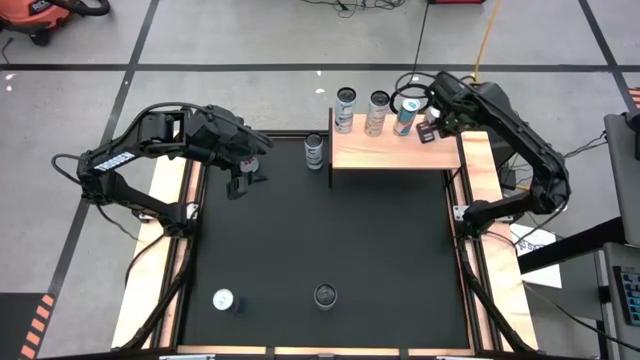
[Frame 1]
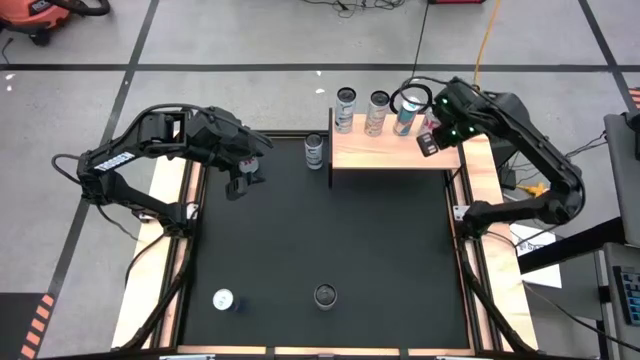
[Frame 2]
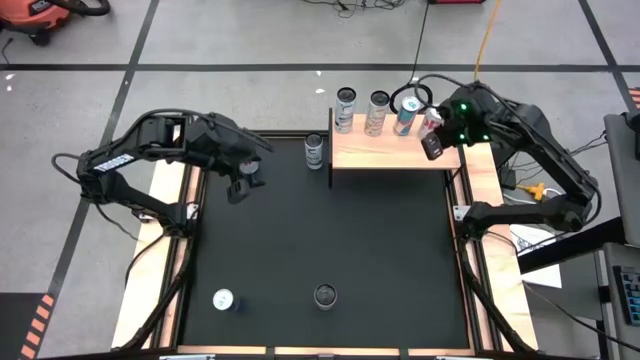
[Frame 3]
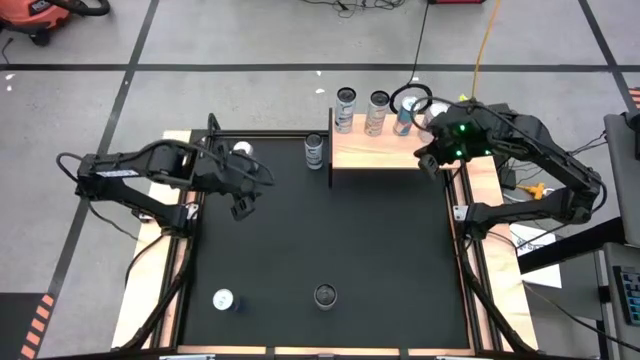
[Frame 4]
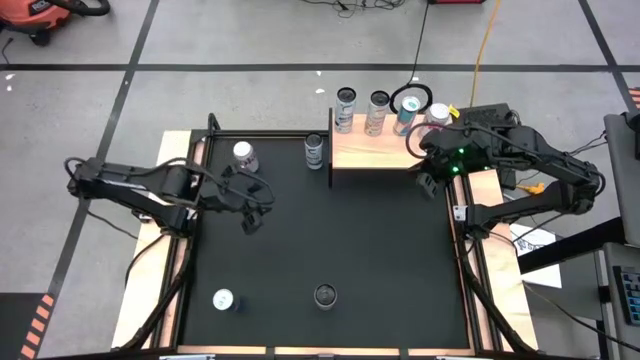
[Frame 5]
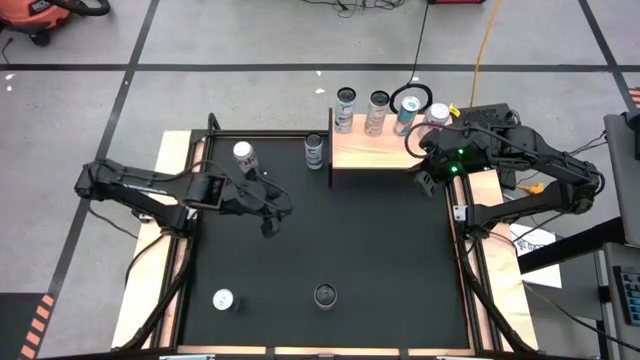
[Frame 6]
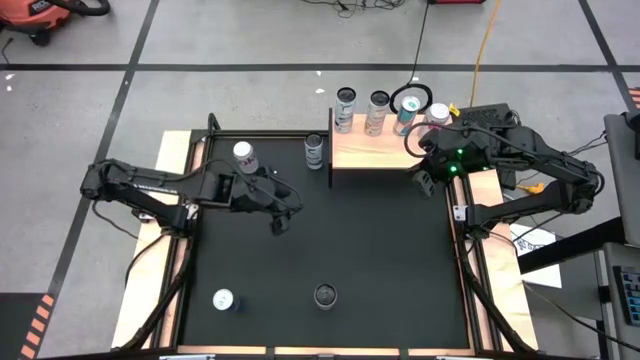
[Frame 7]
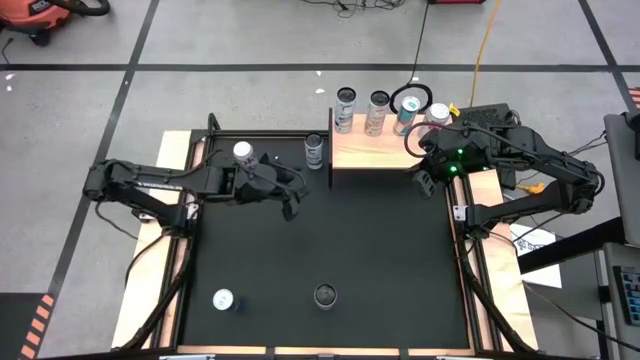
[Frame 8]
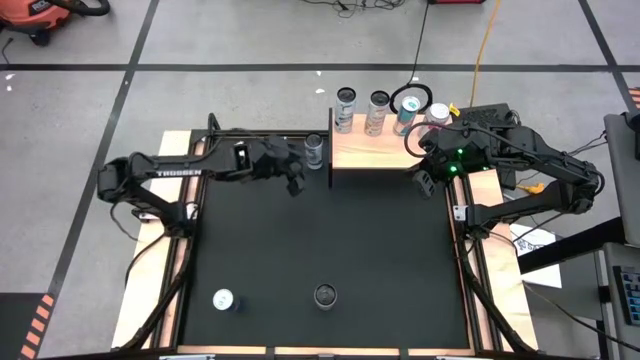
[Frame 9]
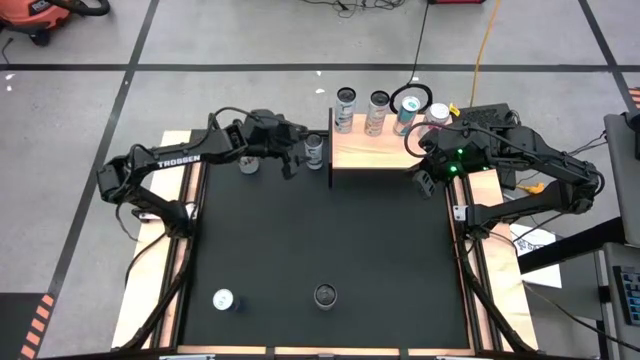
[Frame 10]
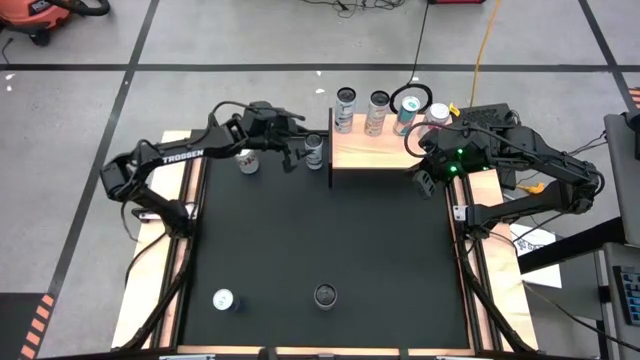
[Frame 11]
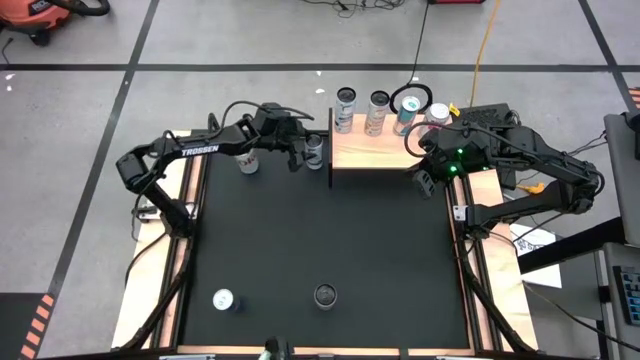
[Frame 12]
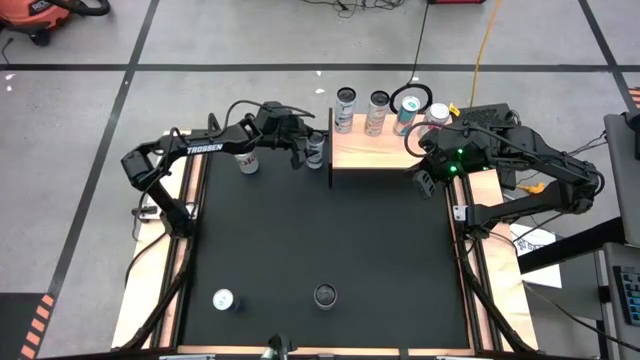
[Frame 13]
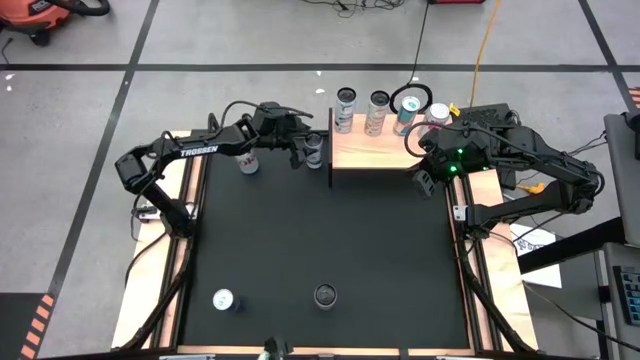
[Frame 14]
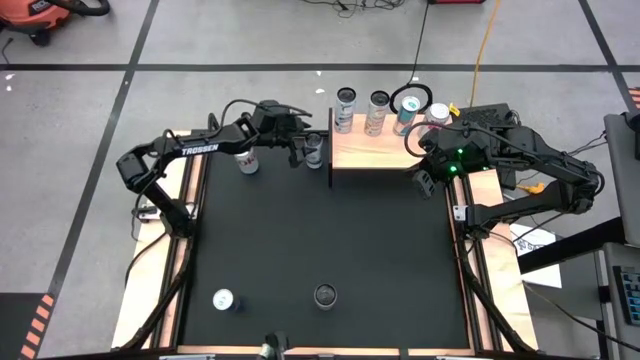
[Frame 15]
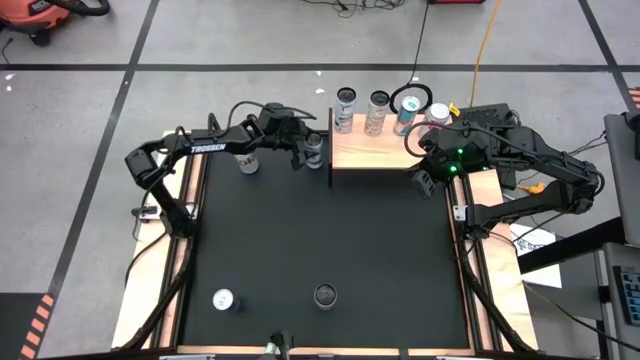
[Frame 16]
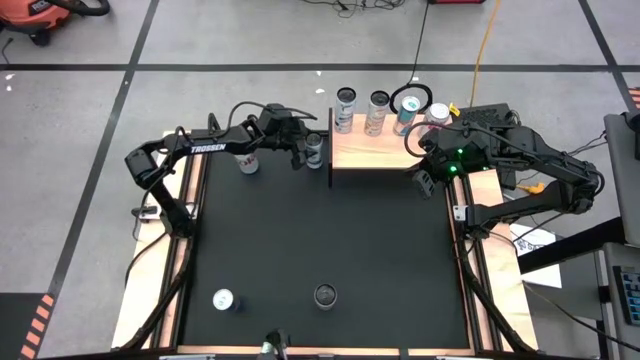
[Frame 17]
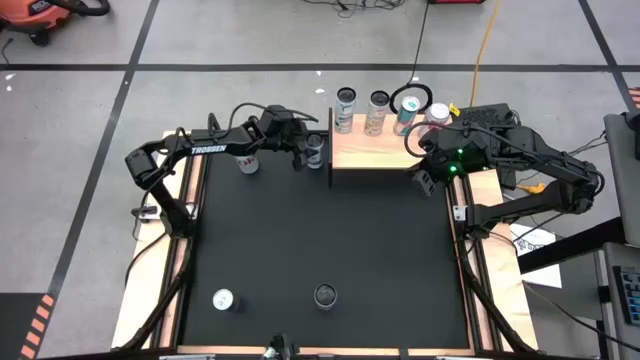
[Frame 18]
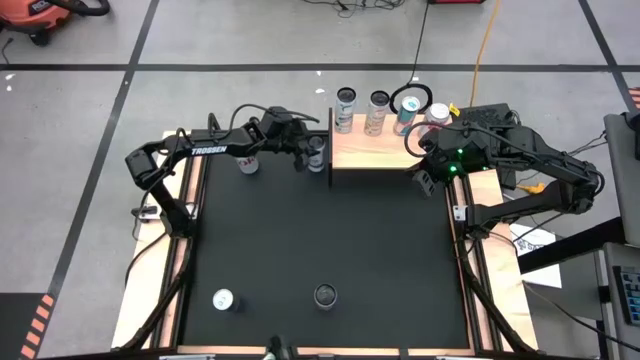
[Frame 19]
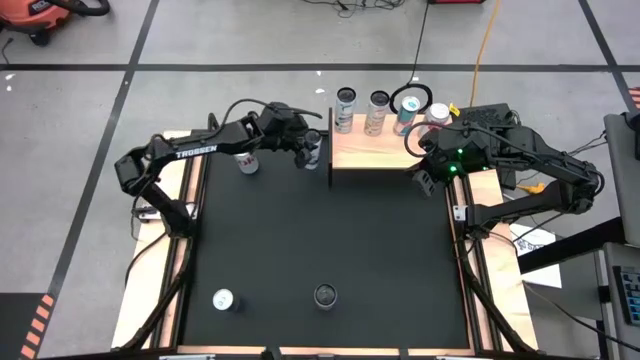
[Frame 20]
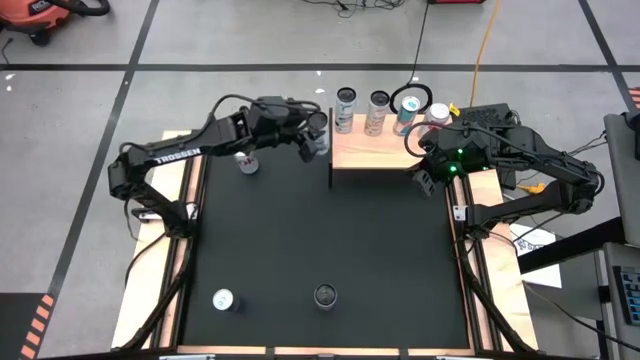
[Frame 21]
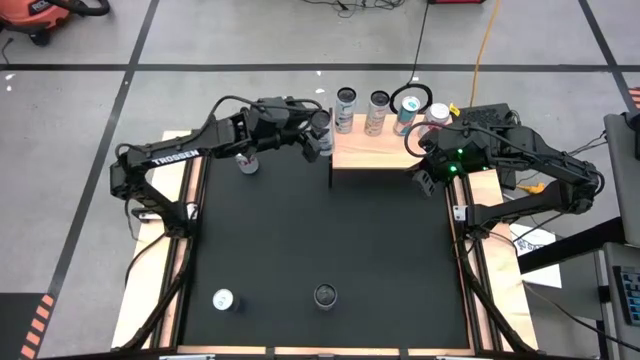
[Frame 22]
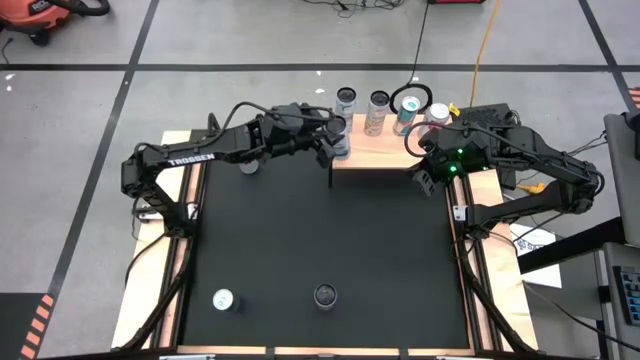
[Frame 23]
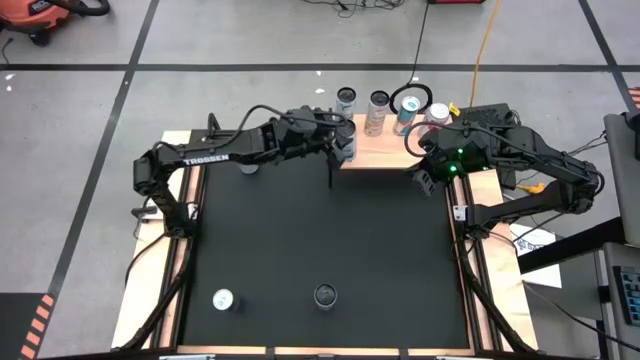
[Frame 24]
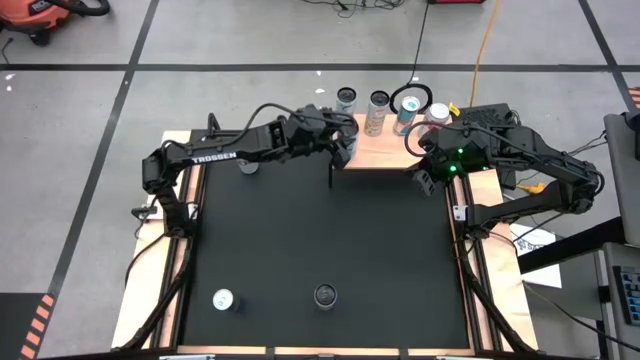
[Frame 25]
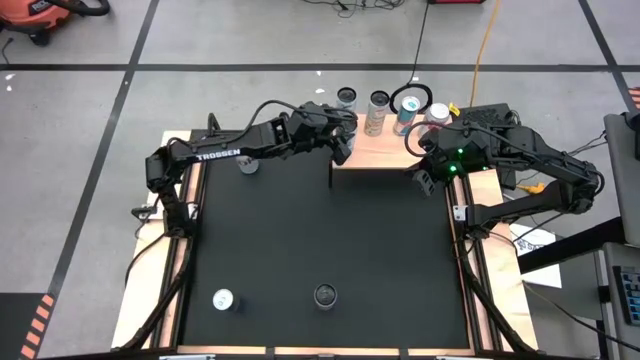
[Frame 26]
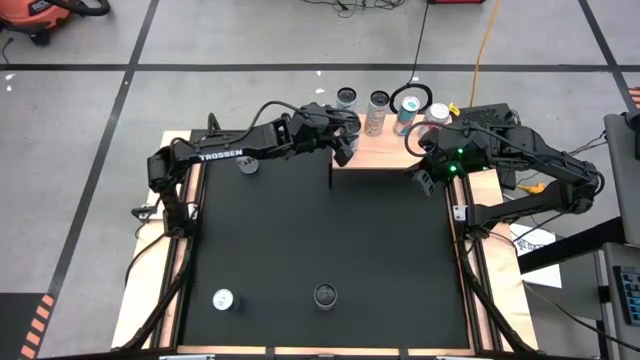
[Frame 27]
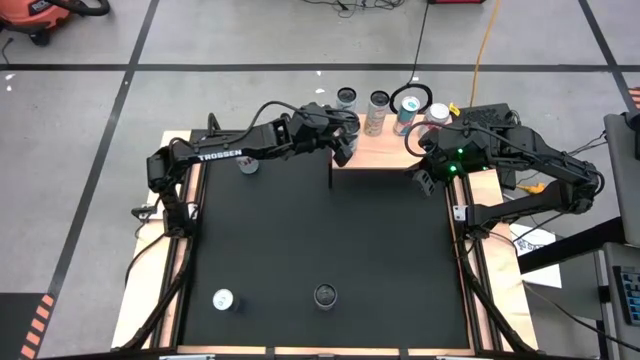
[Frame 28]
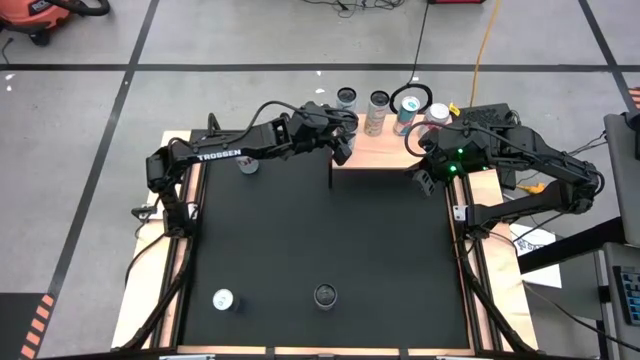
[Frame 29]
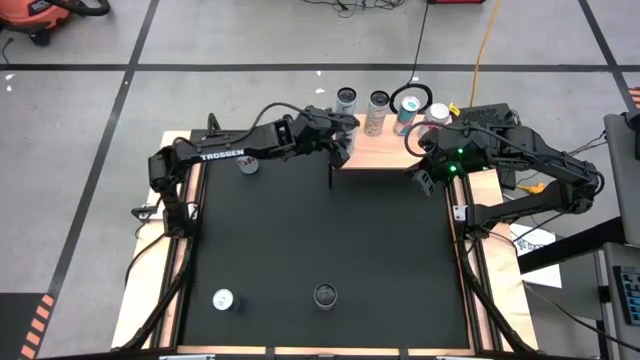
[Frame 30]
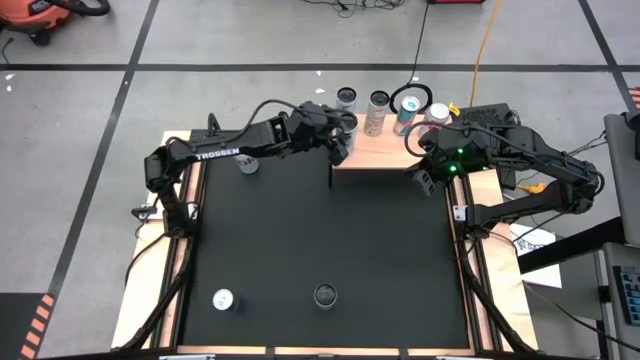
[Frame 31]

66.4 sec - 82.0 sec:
Task: Place canned beverage on shelf
Put the white-blue soda can on the shelf aligned with the other white-blue soda can

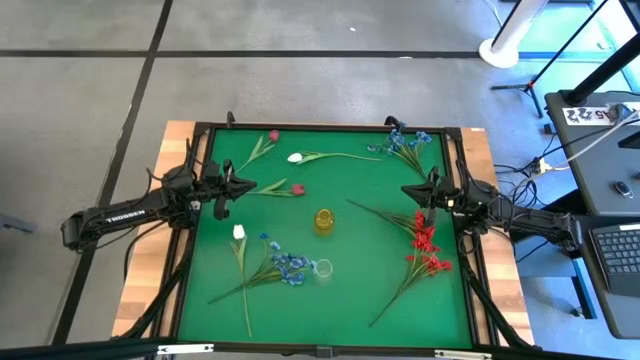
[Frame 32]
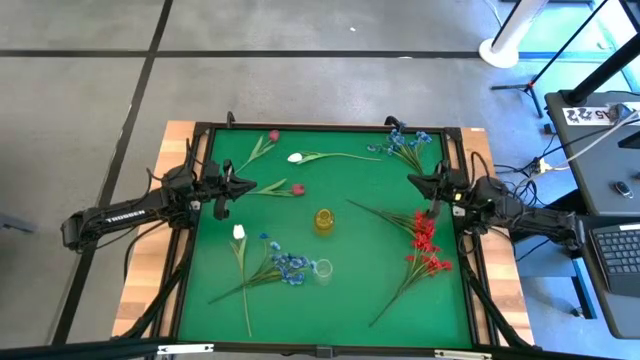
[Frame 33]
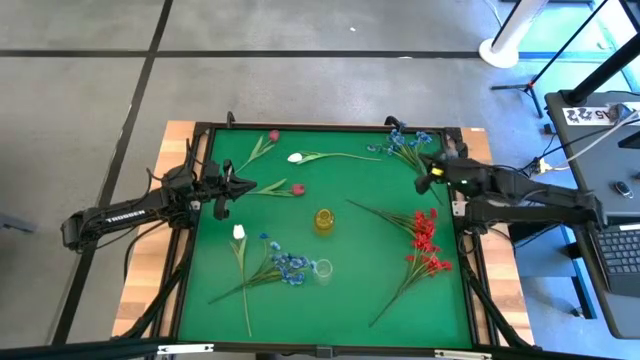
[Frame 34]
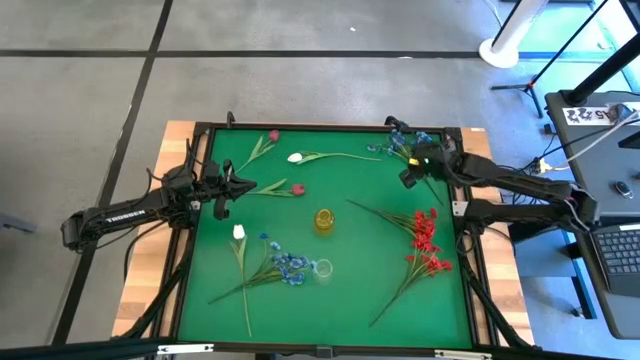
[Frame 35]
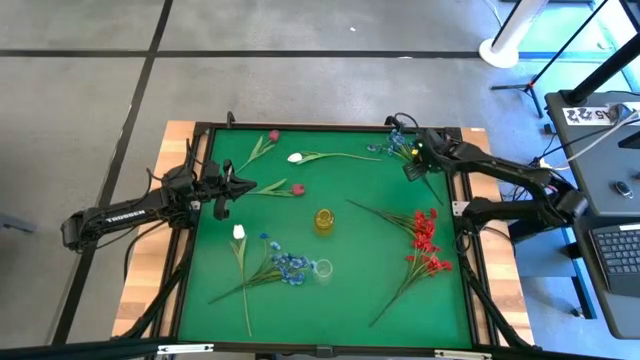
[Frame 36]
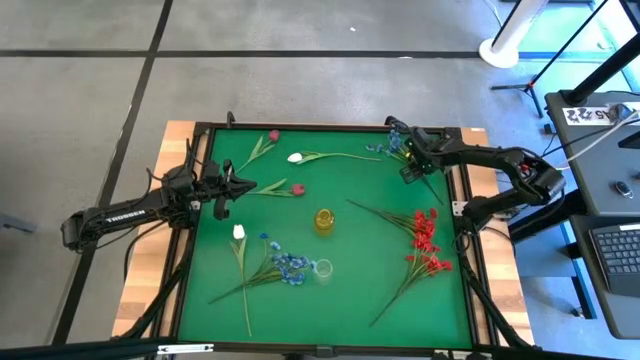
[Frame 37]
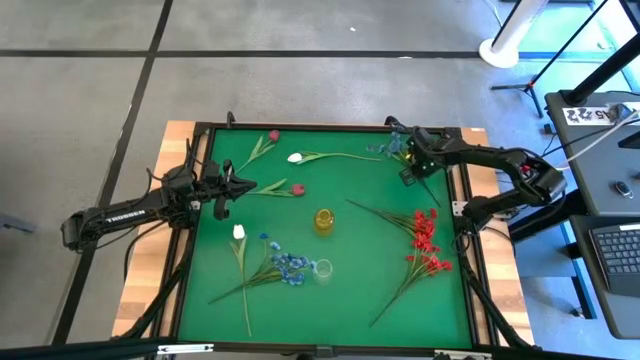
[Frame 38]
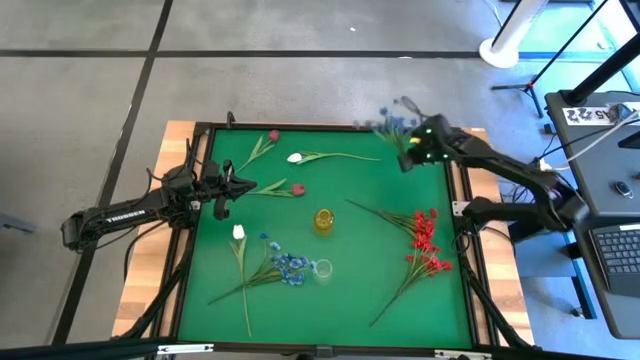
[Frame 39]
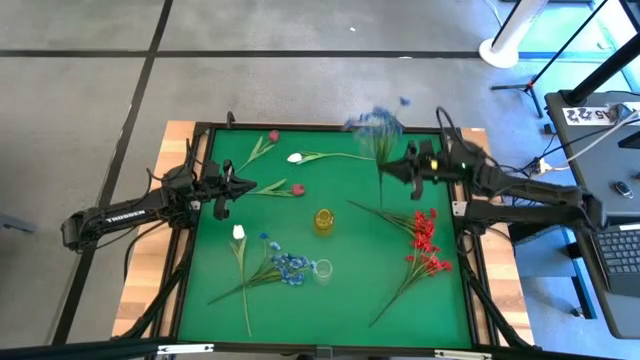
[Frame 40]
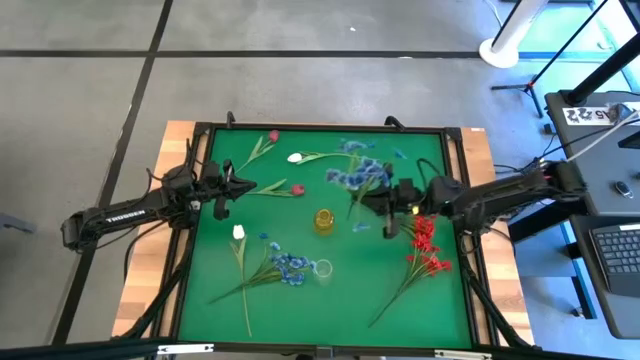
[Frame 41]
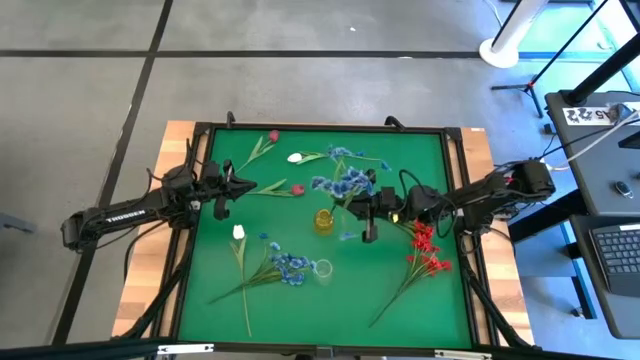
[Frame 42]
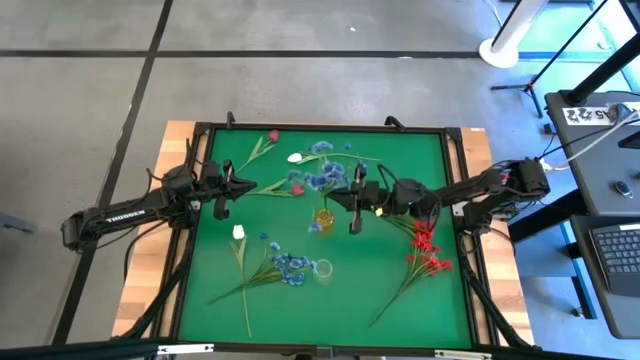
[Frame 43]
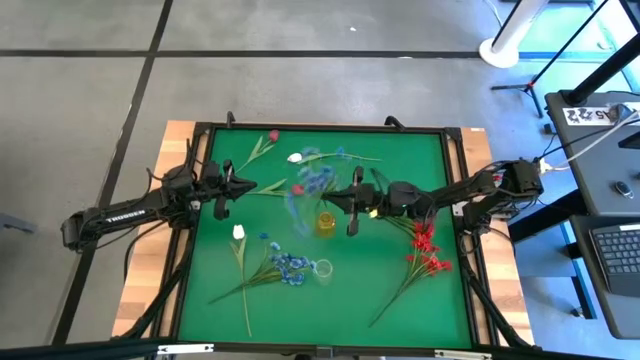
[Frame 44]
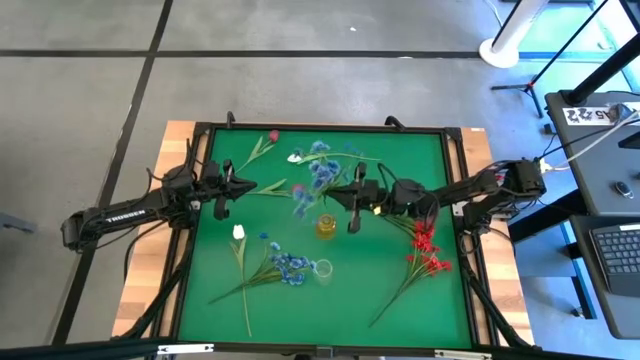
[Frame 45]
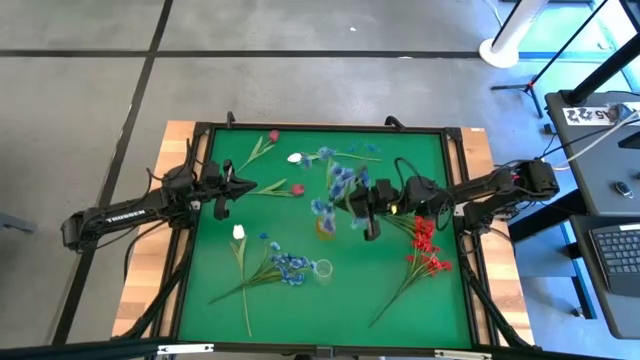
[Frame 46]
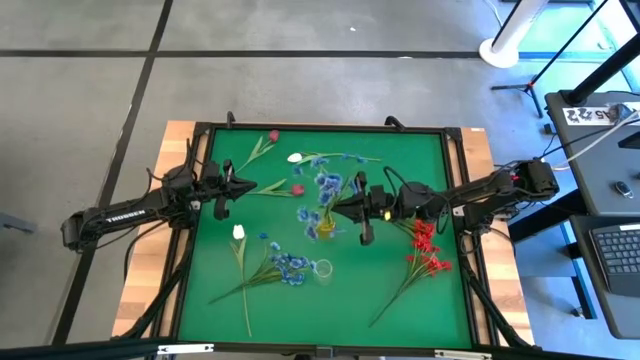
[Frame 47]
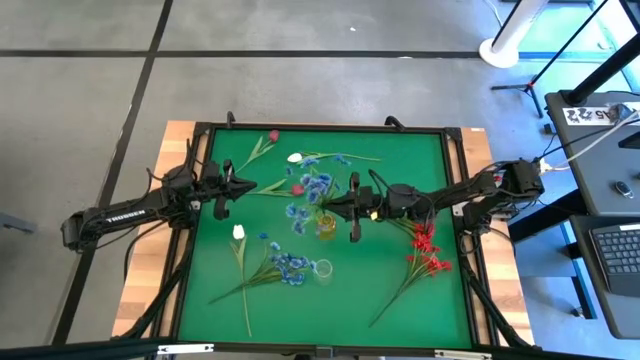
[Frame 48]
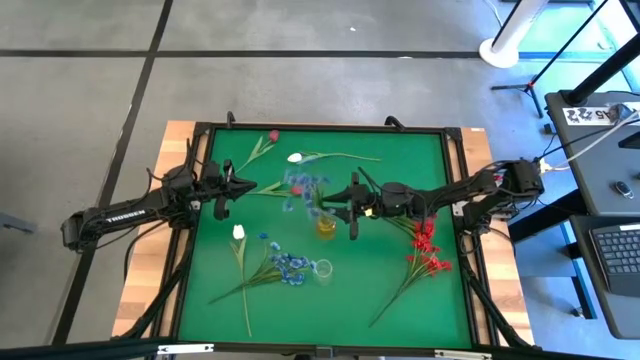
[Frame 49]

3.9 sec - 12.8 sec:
Task: Sort flowers into vase by color
Put the top blue flowers into the yellow flower vase
